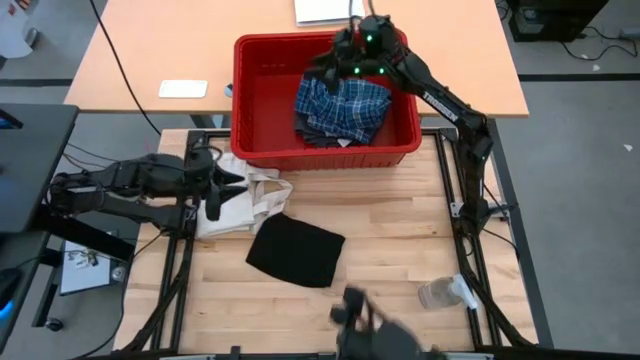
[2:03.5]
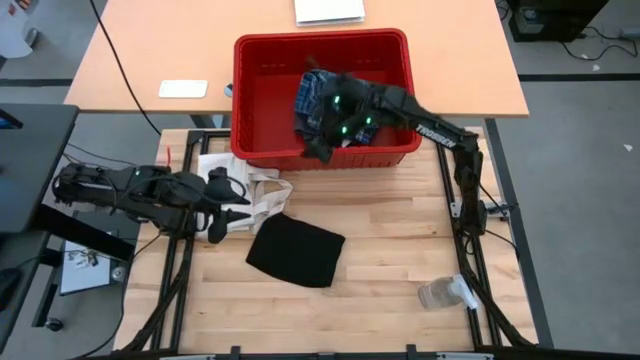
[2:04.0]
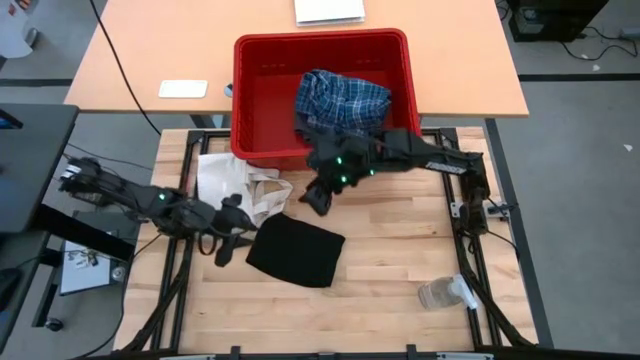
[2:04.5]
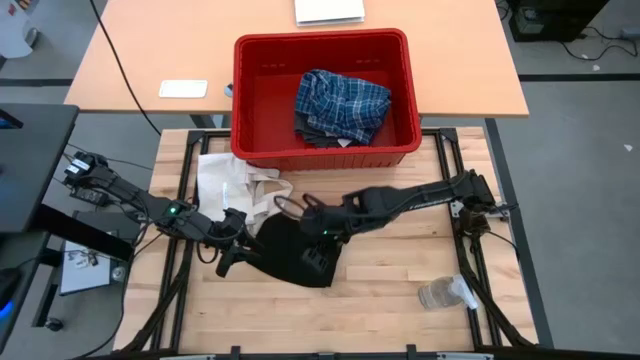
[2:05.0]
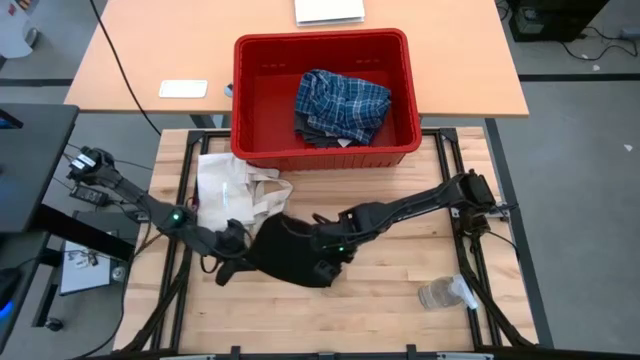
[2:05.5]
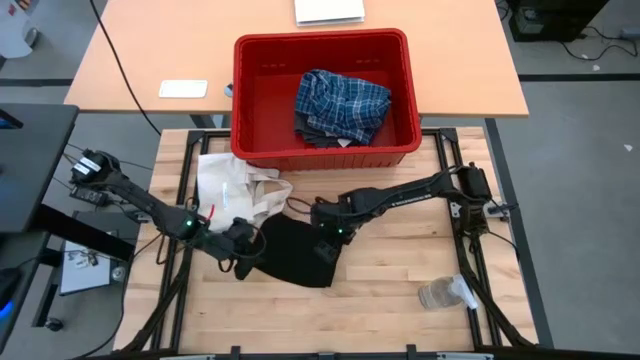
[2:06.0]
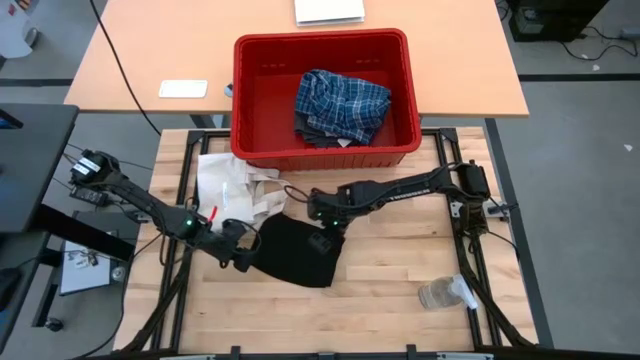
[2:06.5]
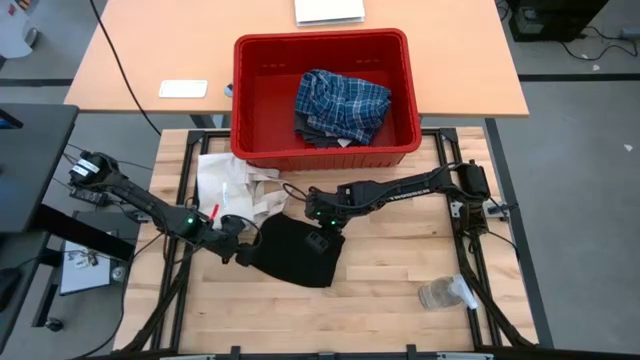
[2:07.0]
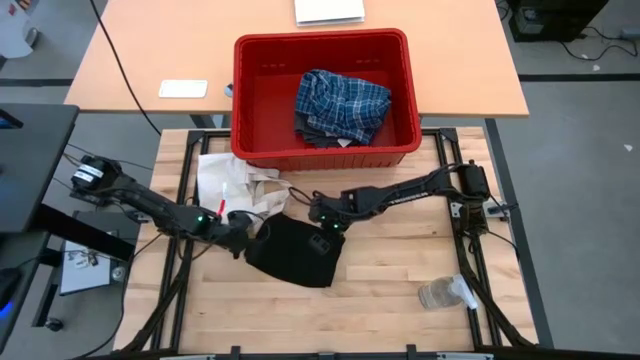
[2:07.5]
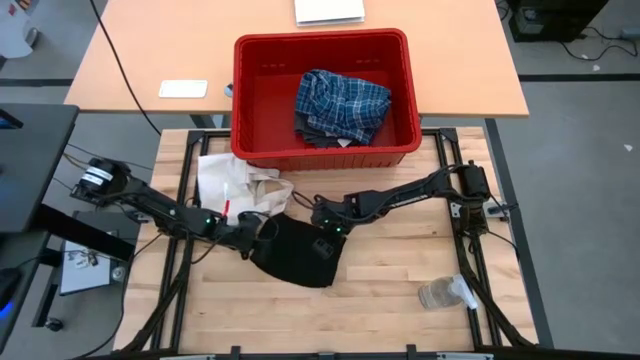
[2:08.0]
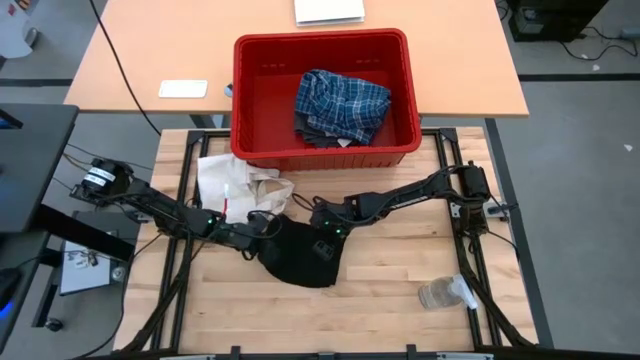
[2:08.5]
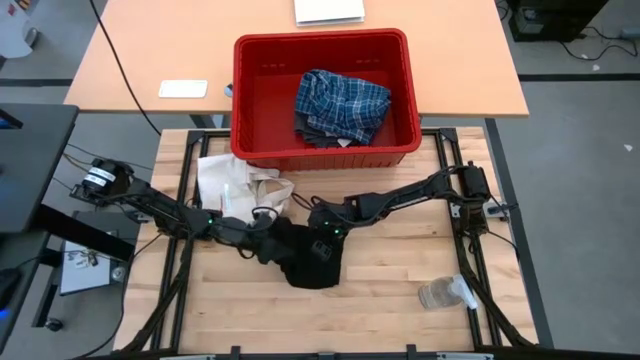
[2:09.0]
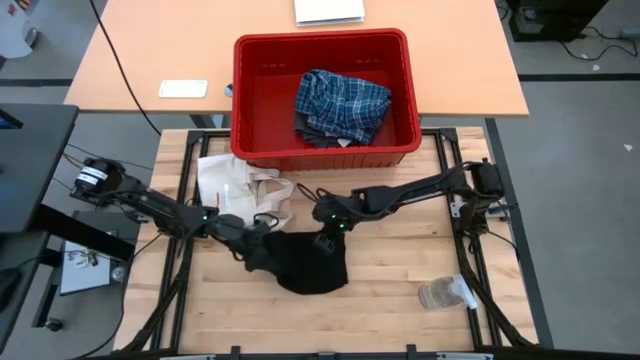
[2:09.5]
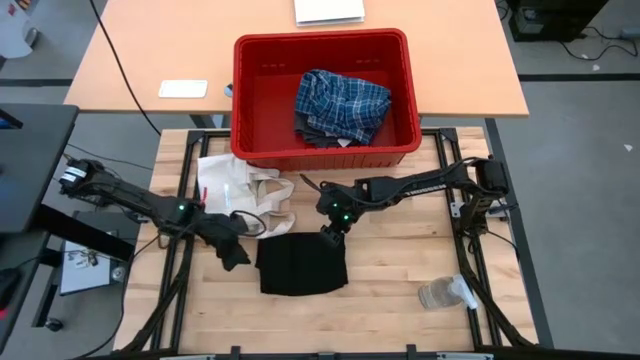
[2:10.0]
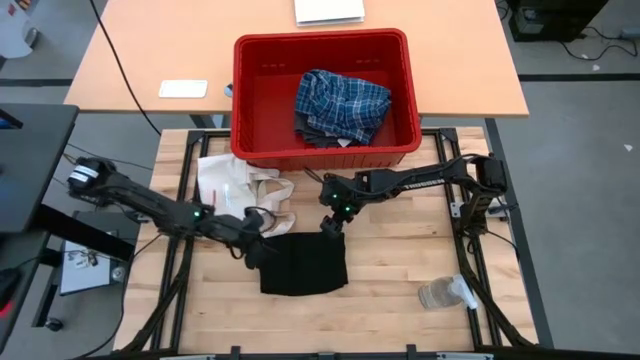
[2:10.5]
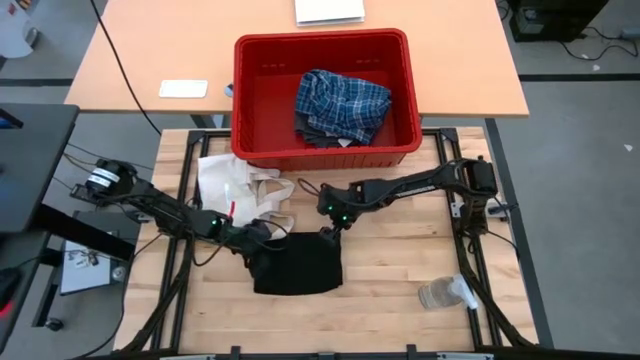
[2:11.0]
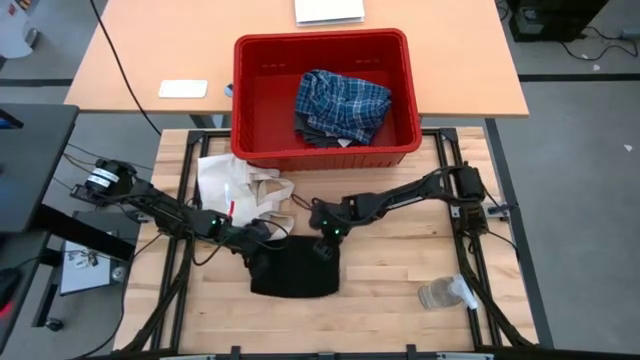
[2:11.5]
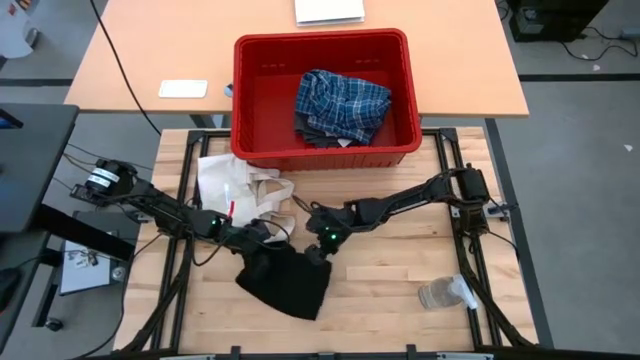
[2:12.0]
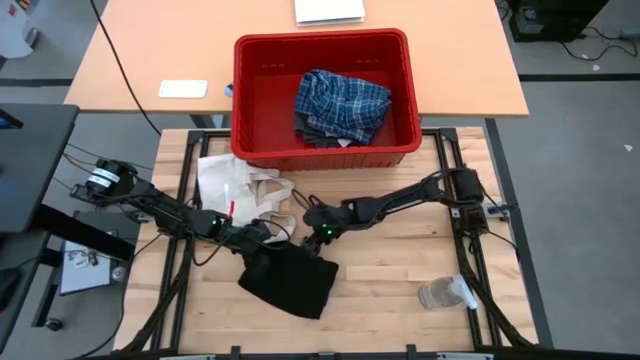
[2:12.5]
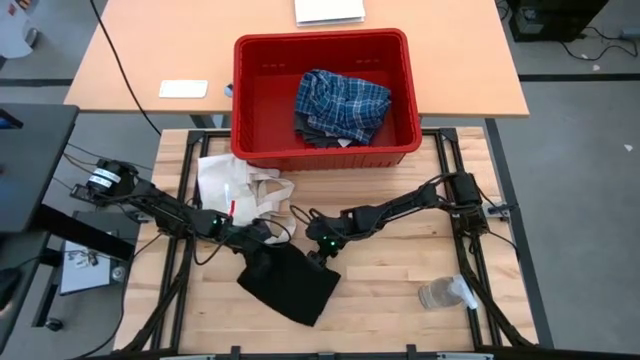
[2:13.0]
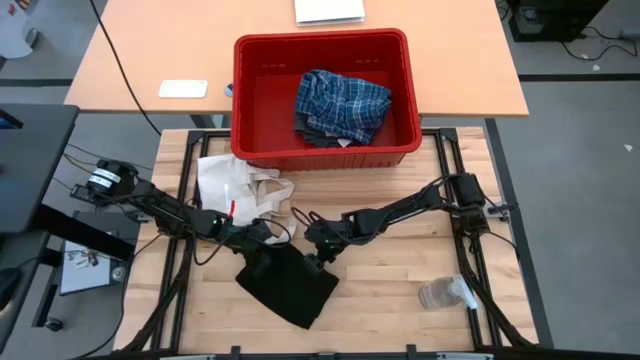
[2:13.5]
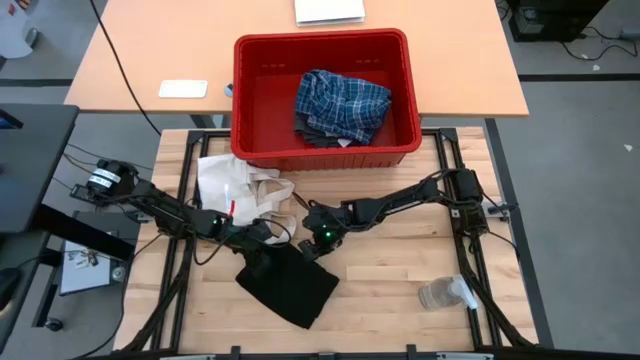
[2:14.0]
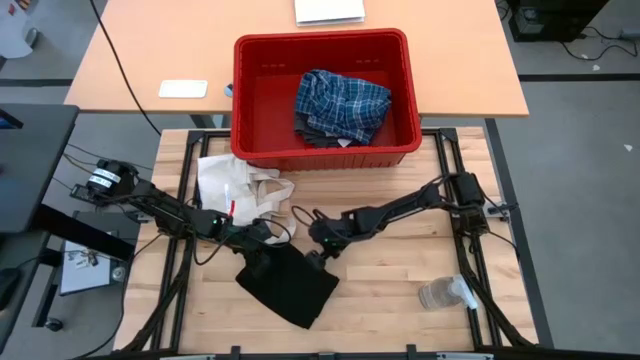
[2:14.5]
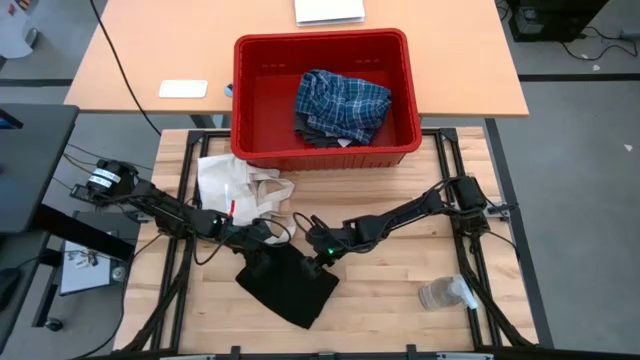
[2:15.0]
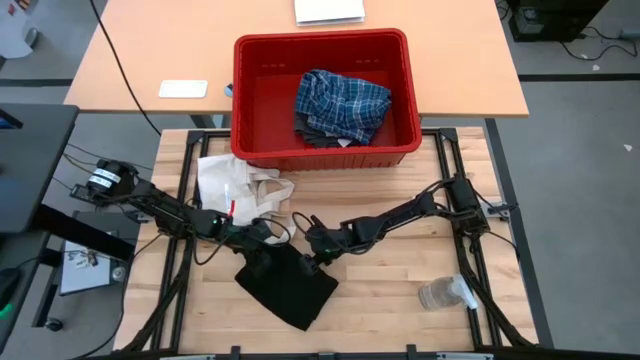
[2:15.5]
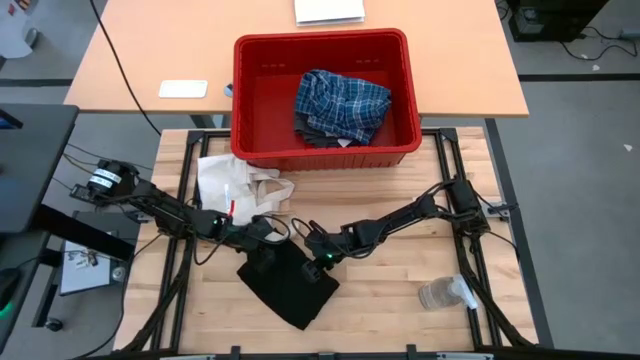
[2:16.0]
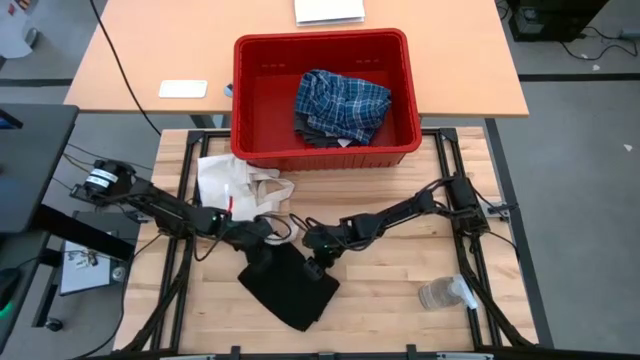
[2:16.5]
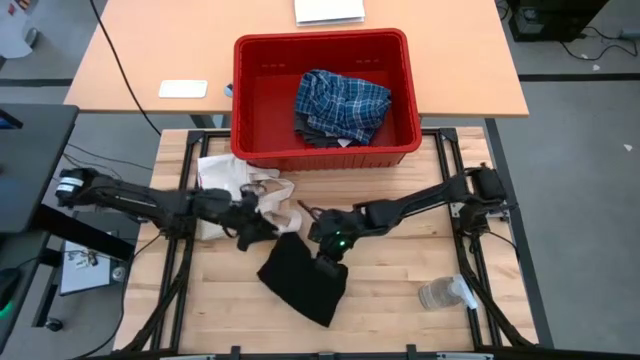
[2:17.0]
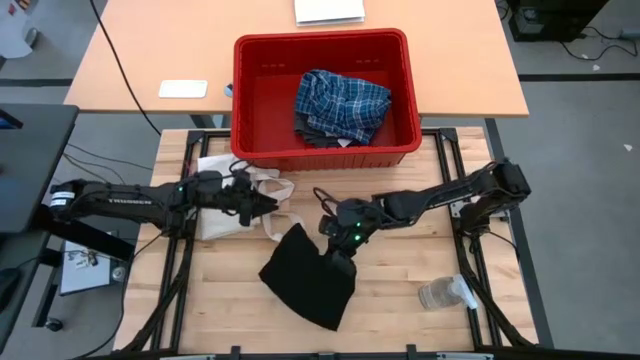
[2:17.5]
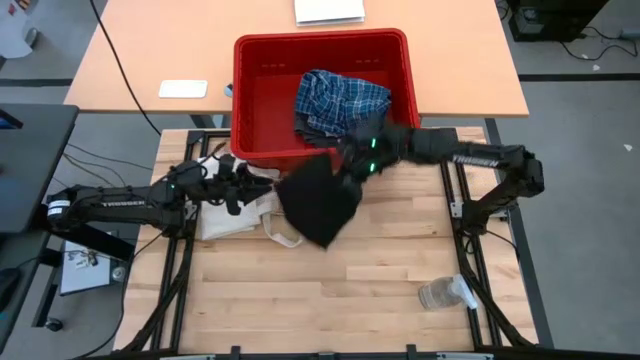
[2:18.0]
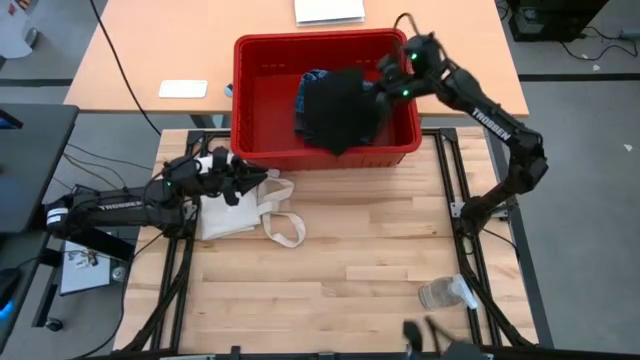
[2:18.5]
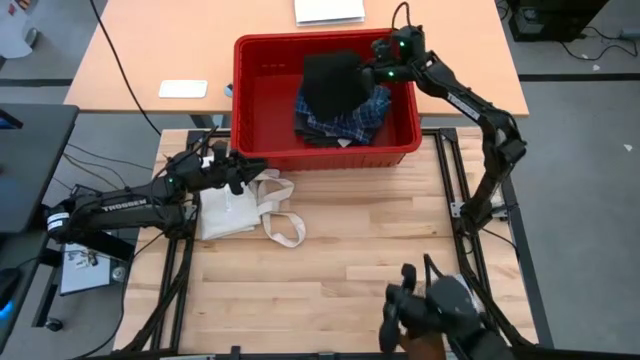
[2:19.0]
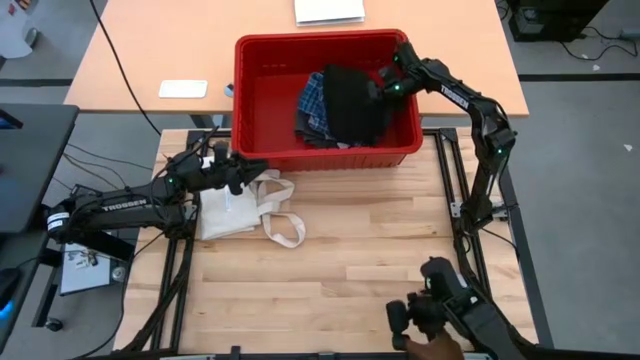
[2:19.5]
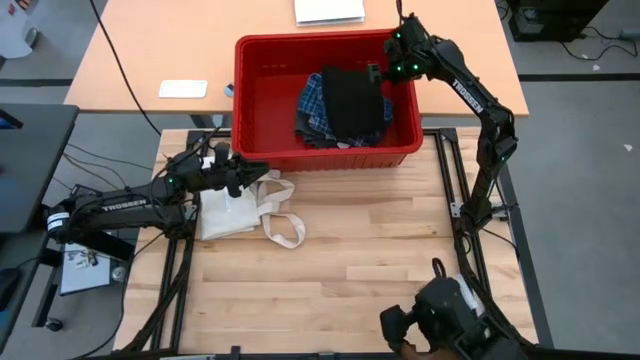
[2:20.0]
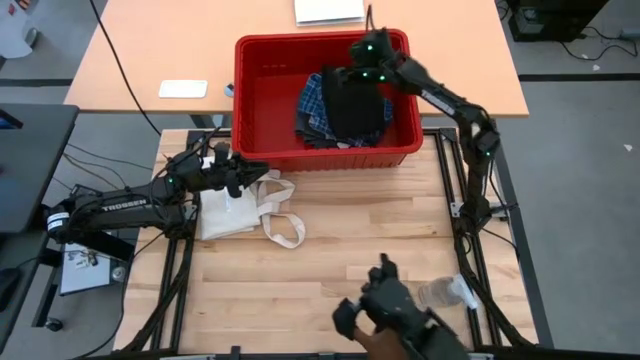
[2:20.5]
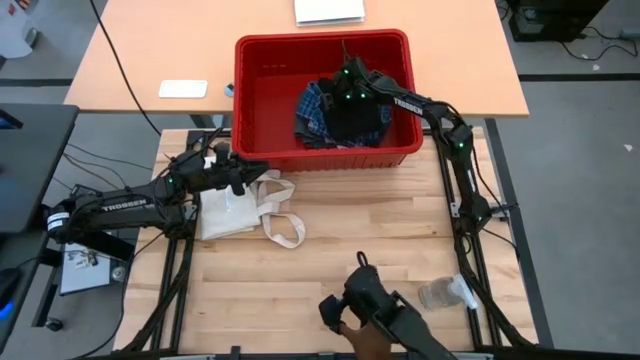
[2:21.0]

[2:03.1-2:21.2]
Task: Fold laundry
Put the black shirt into the red bin

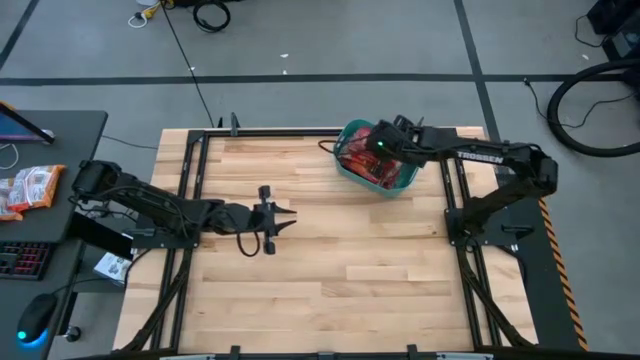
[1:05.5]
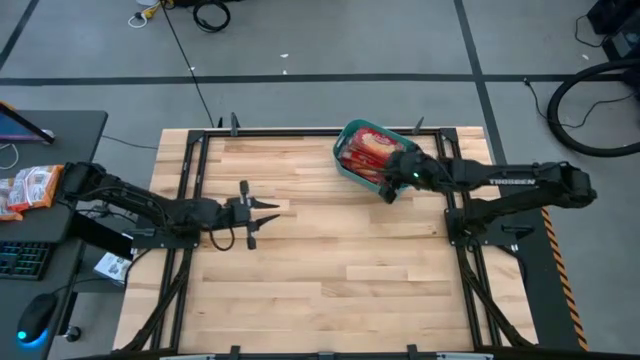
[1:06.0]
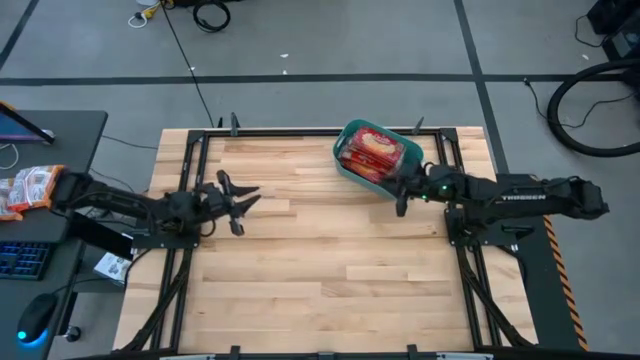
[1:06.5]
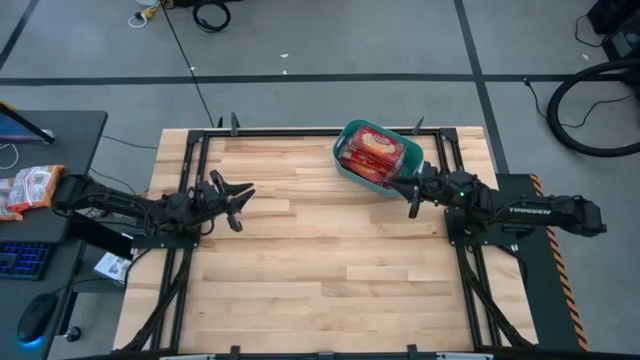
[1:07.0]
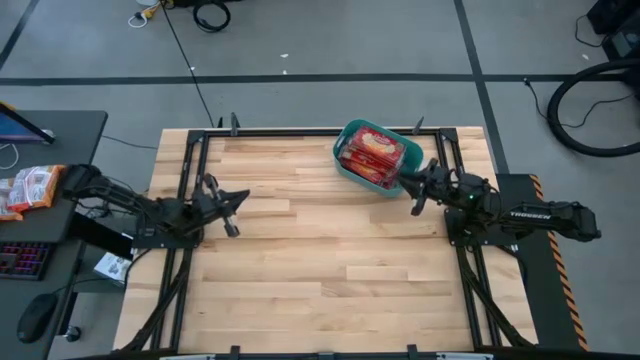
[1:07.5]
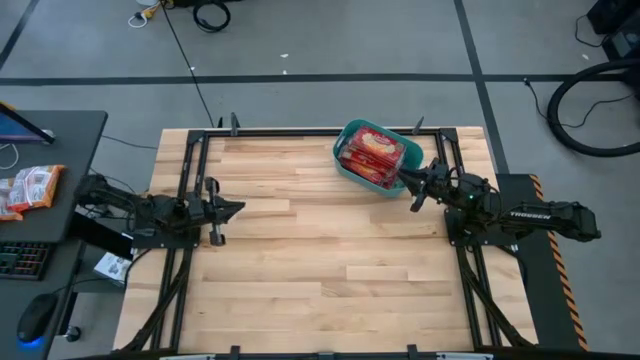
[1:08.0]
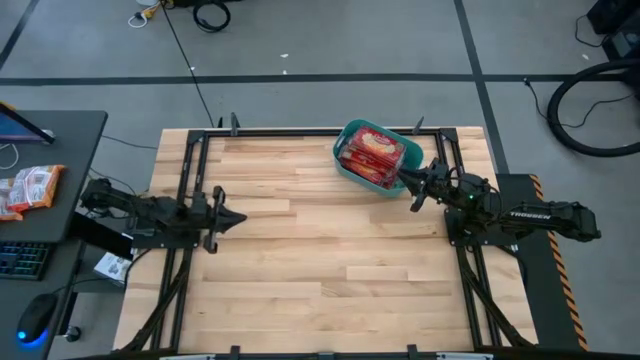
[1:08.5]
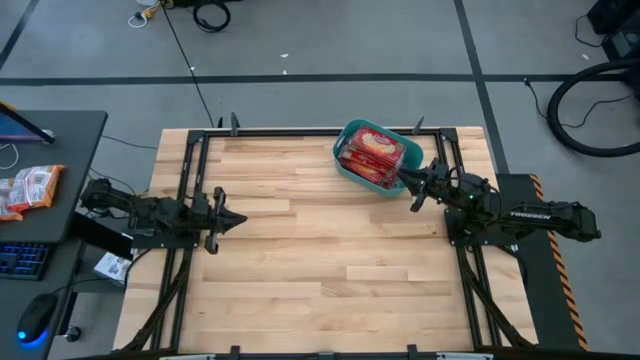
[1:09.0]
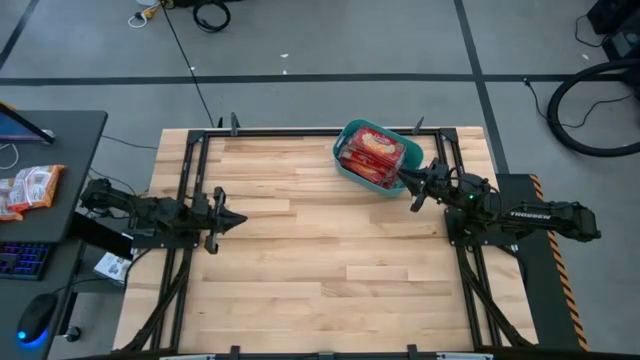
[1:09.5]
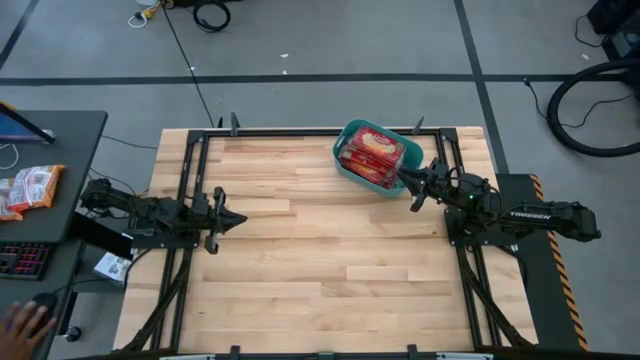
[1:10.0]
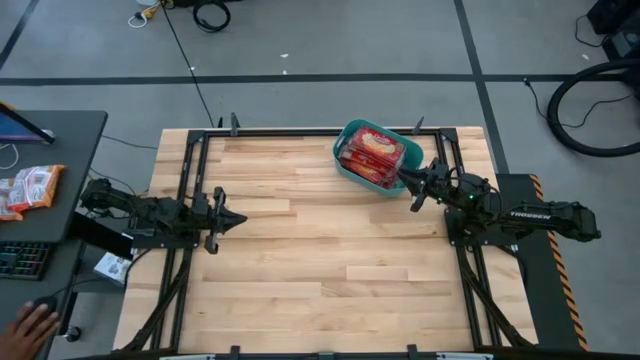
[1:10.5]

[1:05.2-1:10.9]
Task: Sort popcorn bags into baskets
Return to Home Position
